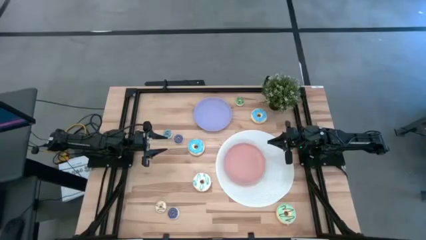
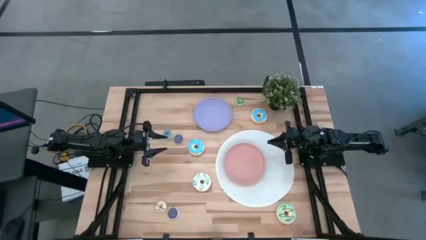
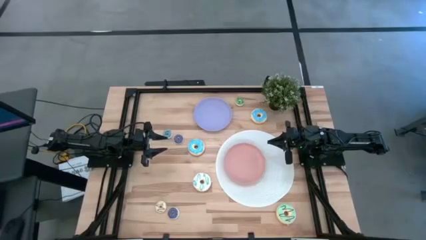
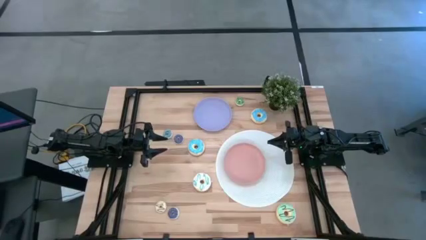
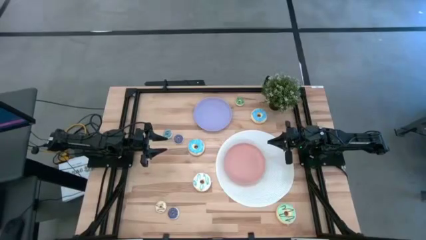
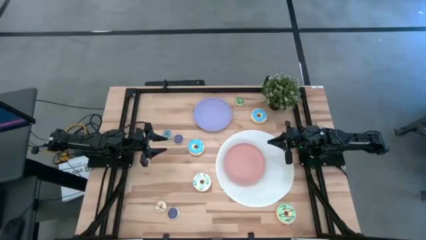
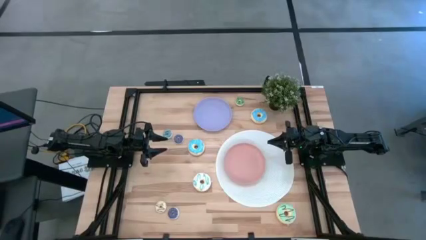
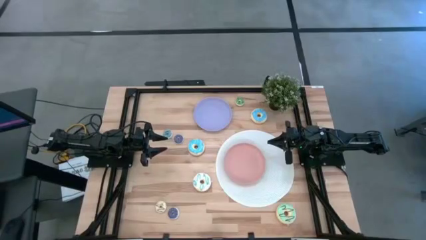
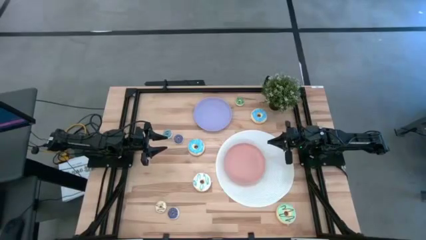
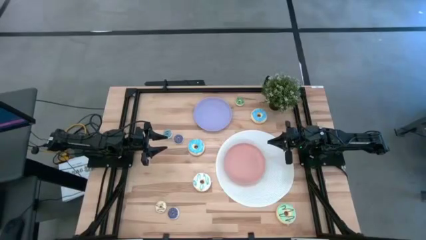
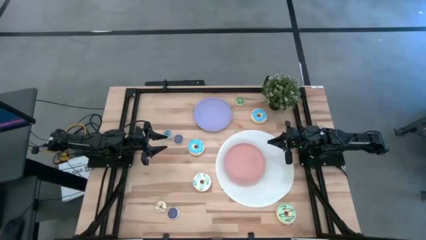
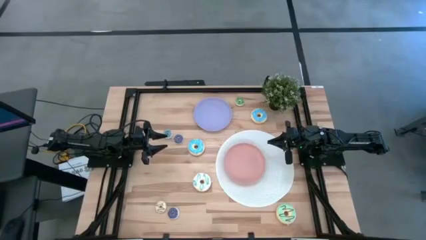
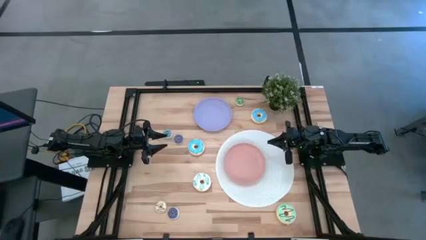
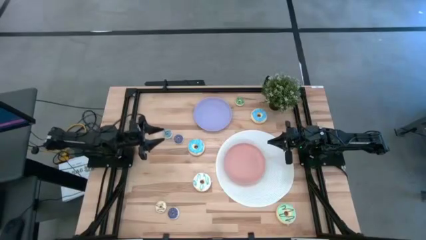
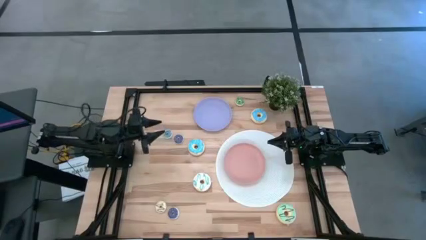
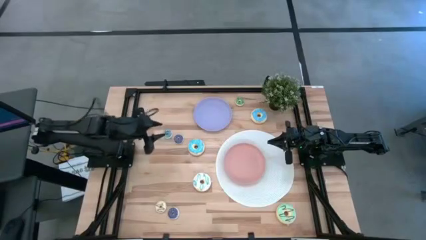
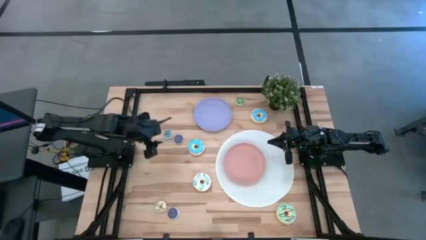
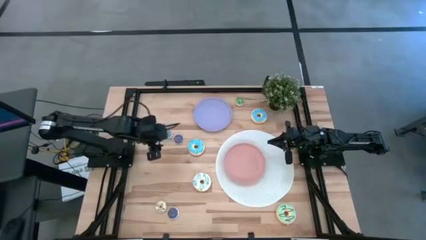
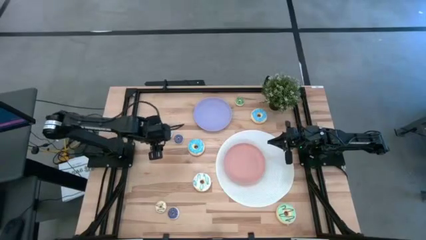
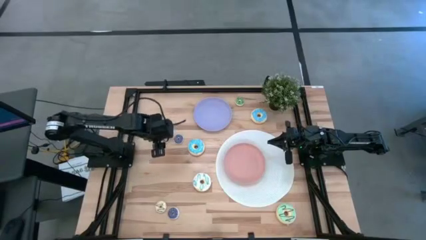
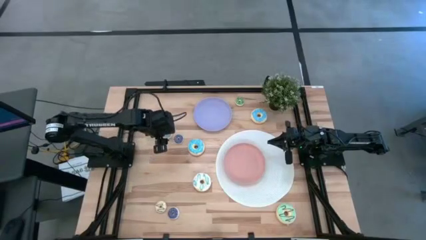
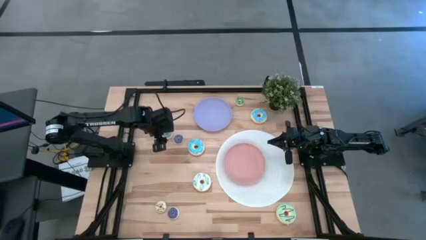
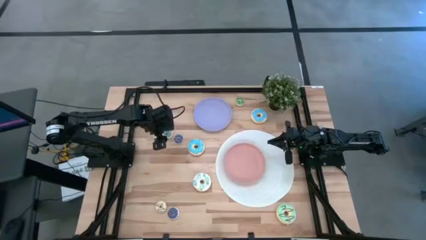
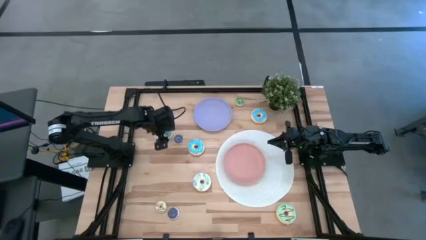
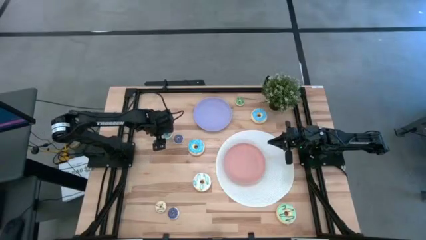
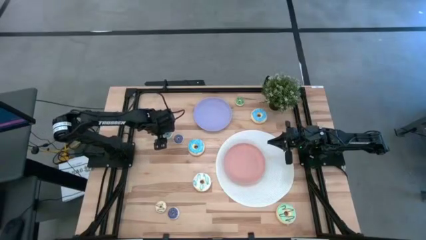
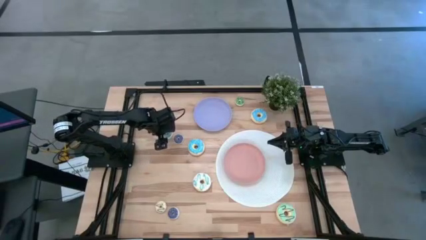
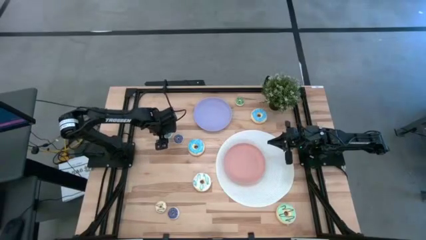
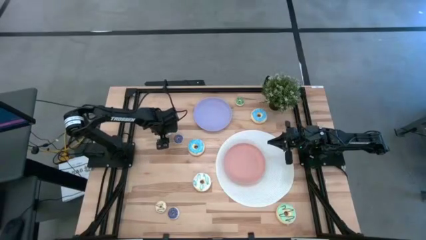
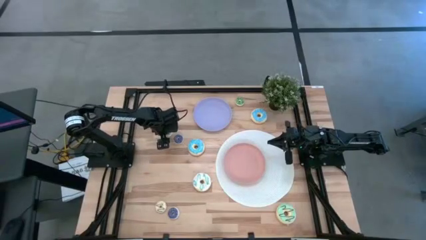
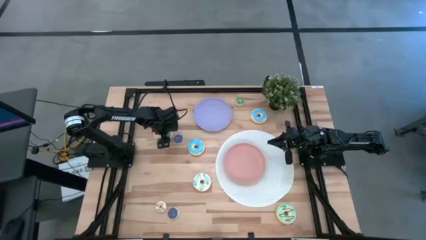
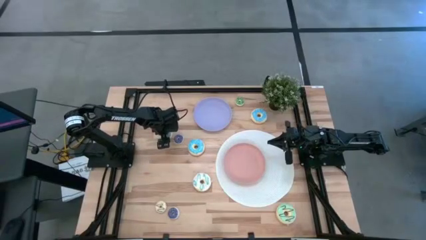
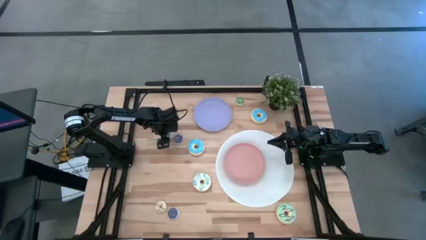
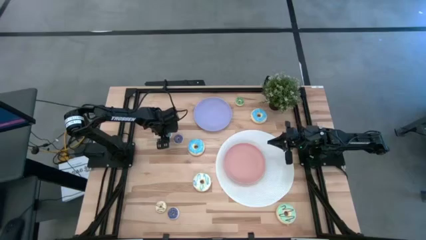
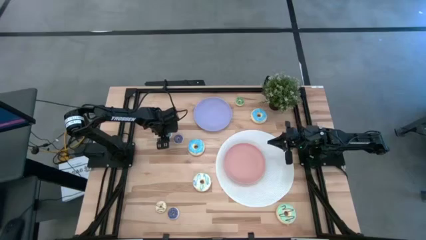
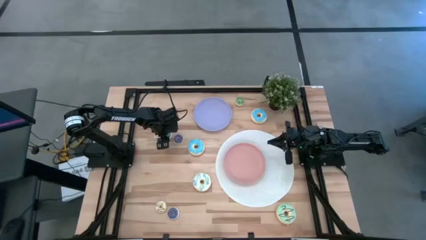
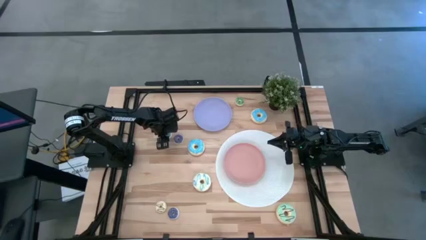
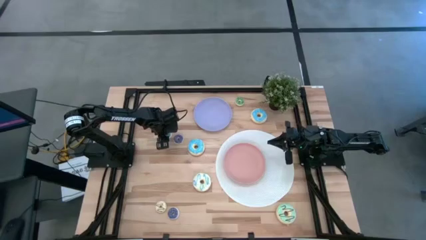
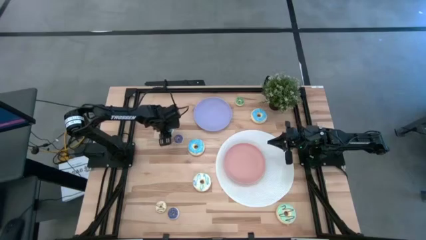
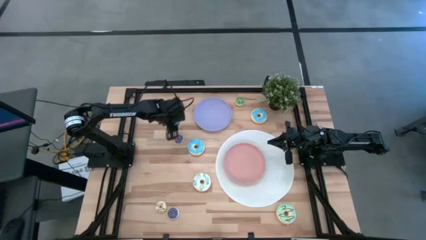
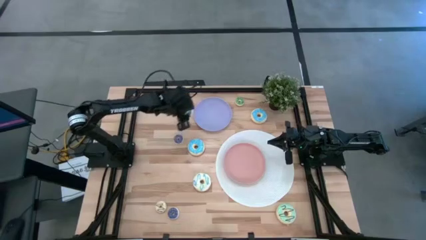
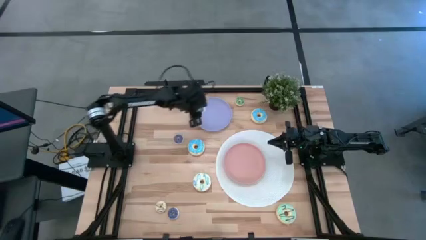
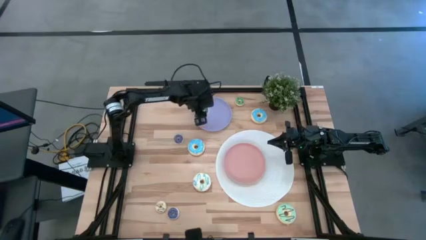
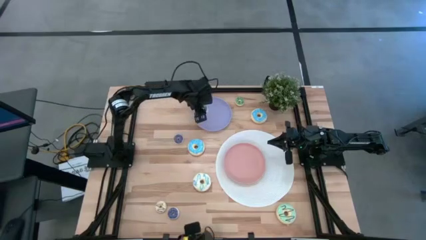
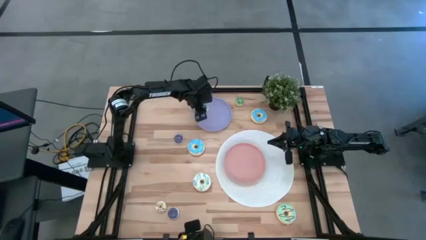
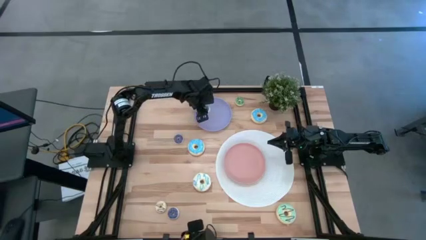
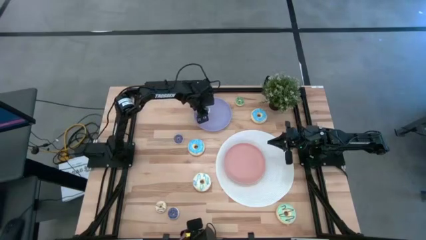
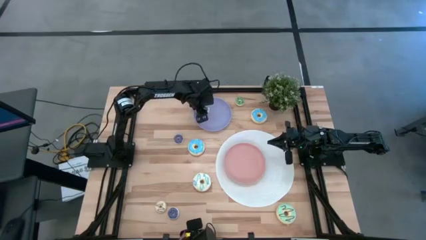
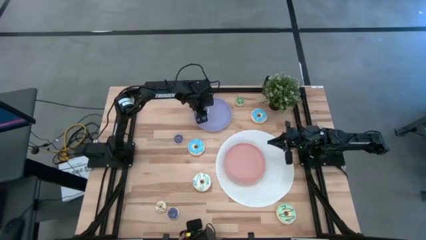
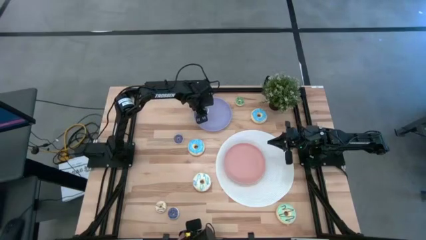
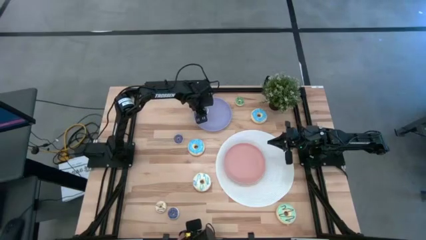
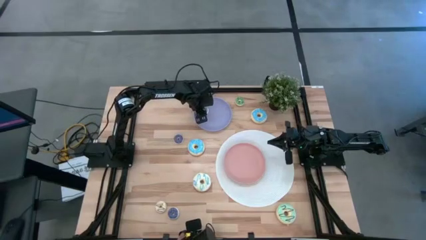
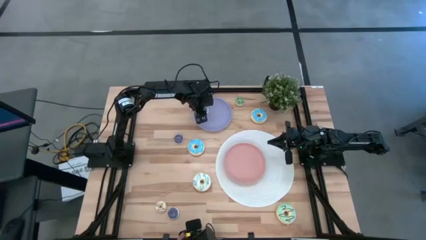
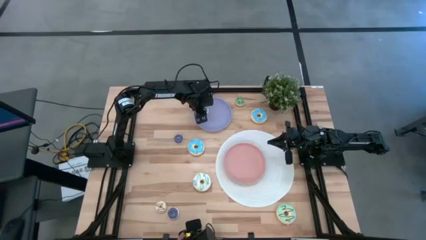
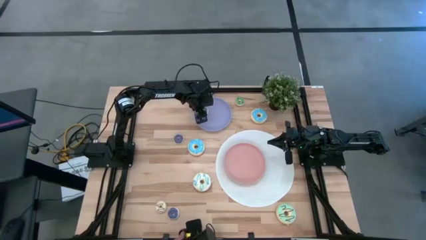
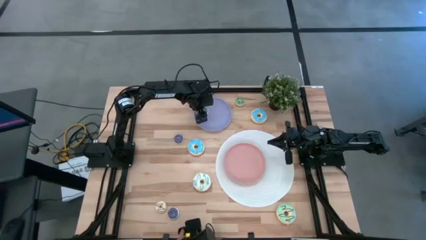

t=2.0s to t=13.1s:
Task: Pick & Place donuts
Put the small blue donut on the violet plate
